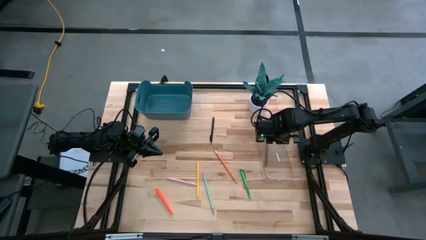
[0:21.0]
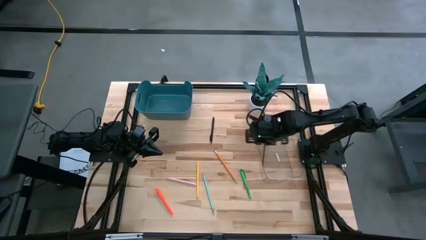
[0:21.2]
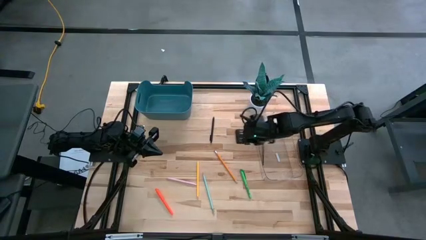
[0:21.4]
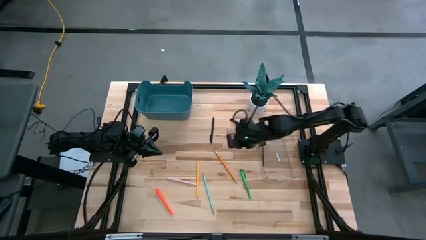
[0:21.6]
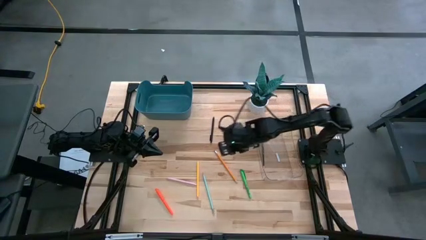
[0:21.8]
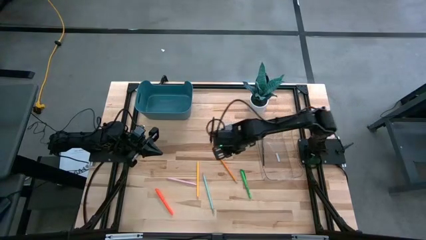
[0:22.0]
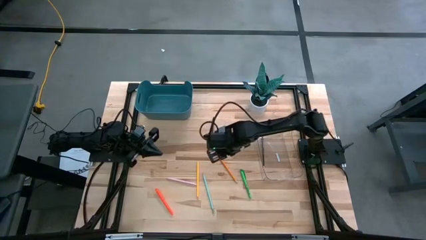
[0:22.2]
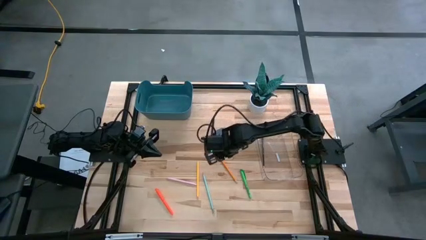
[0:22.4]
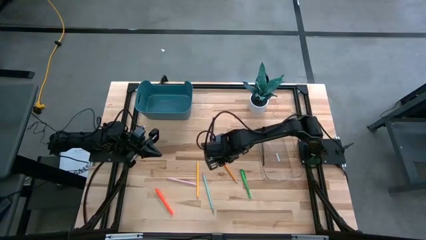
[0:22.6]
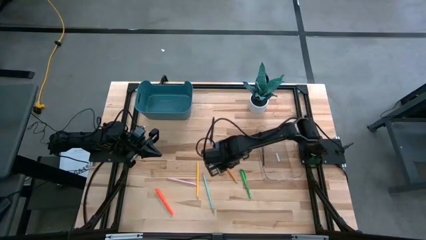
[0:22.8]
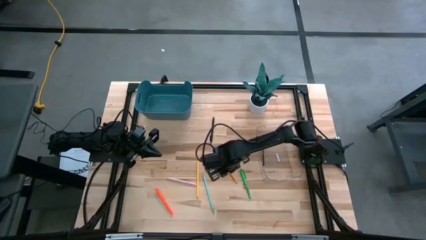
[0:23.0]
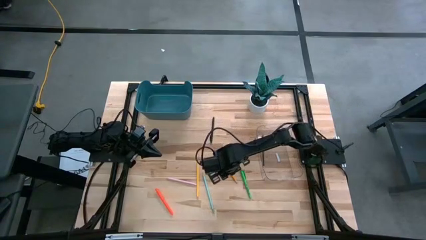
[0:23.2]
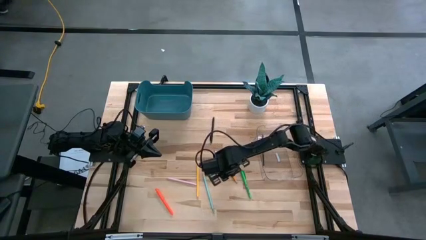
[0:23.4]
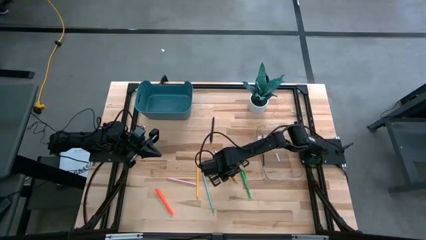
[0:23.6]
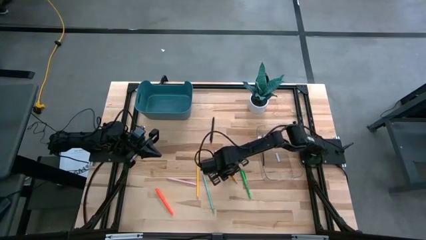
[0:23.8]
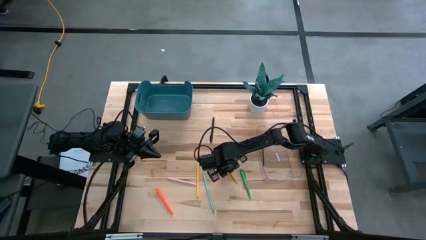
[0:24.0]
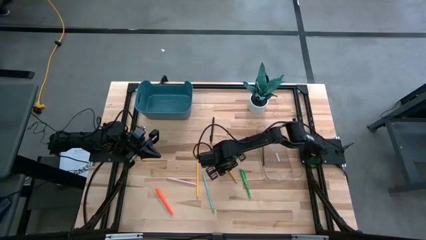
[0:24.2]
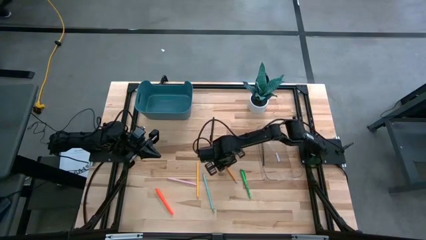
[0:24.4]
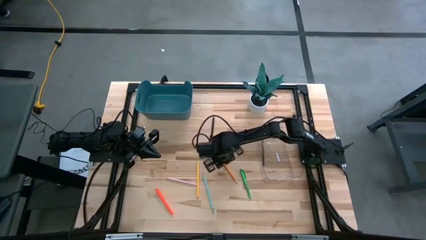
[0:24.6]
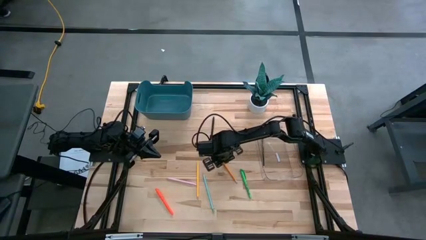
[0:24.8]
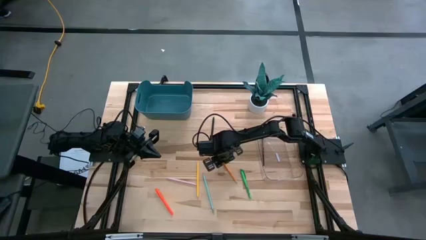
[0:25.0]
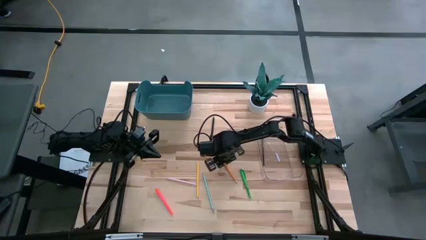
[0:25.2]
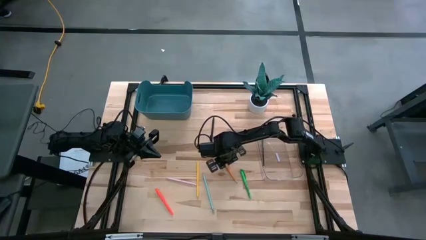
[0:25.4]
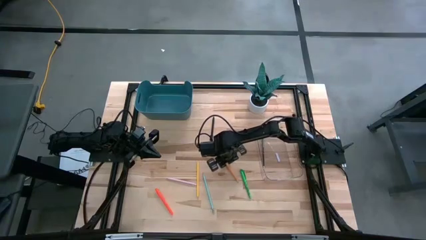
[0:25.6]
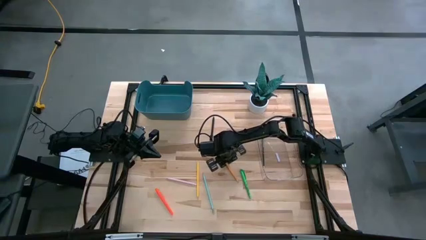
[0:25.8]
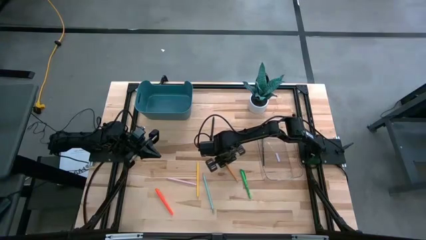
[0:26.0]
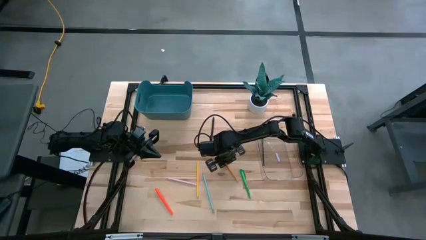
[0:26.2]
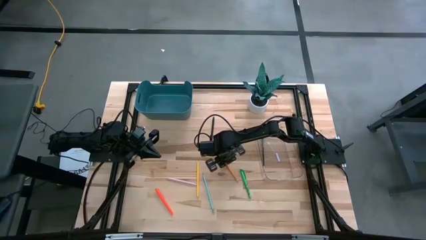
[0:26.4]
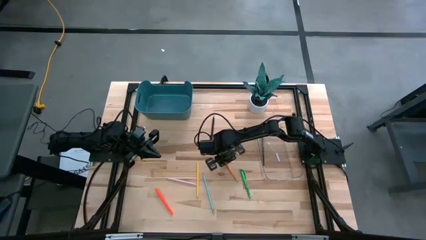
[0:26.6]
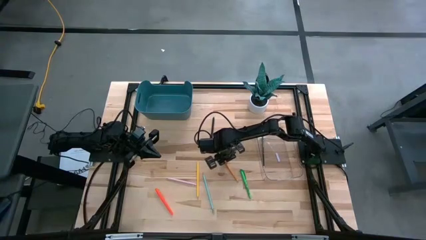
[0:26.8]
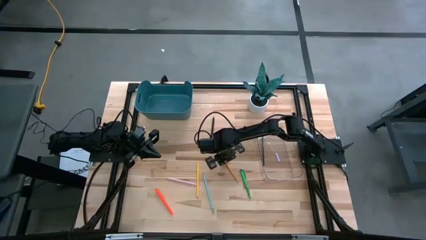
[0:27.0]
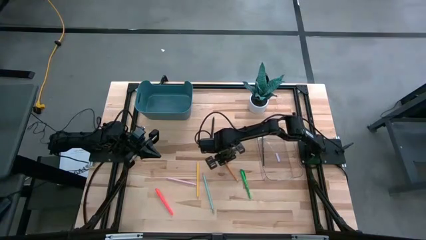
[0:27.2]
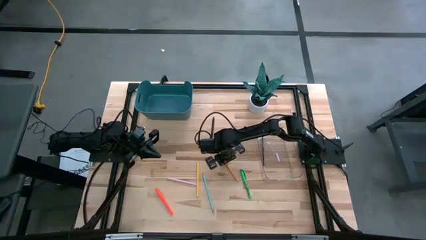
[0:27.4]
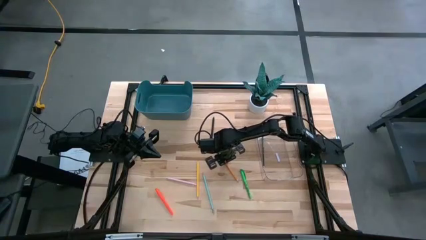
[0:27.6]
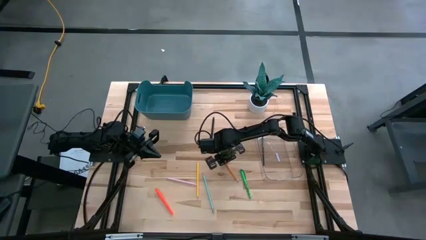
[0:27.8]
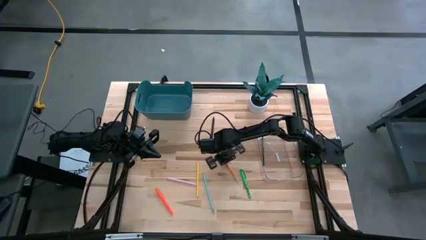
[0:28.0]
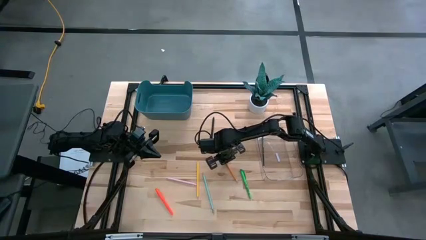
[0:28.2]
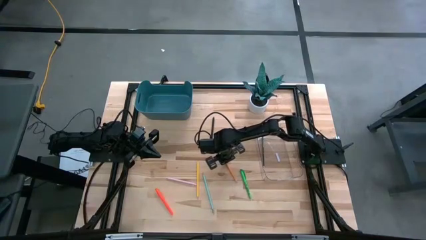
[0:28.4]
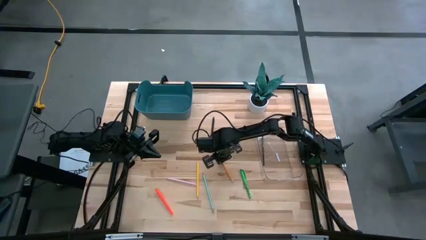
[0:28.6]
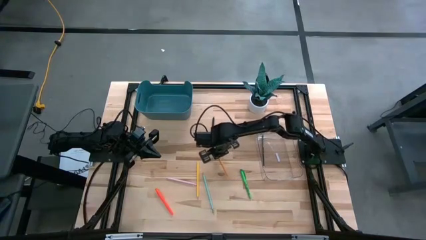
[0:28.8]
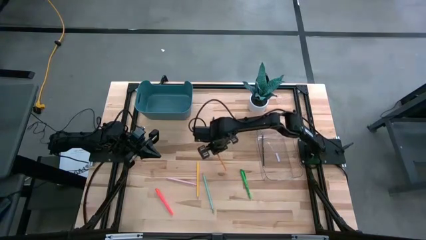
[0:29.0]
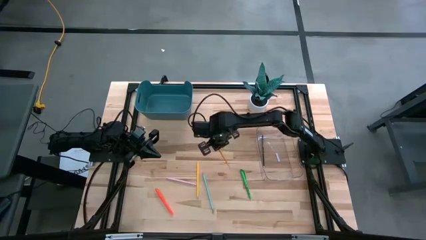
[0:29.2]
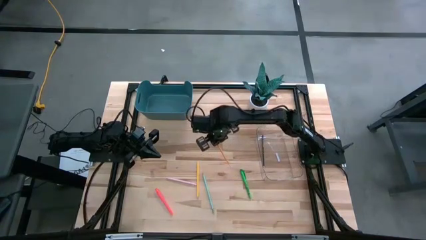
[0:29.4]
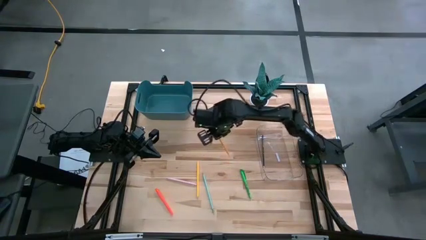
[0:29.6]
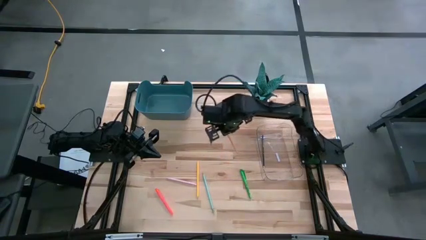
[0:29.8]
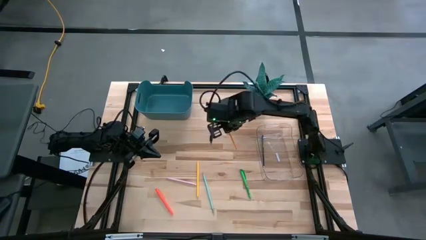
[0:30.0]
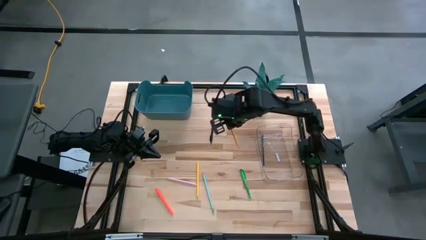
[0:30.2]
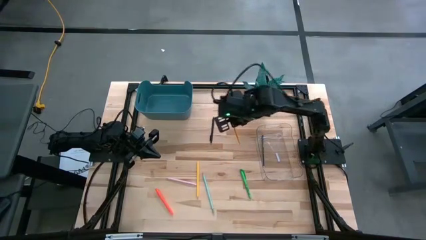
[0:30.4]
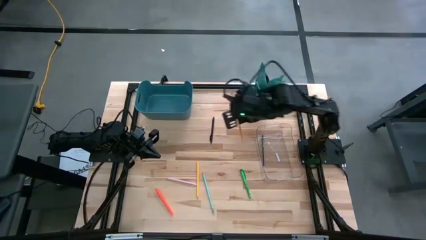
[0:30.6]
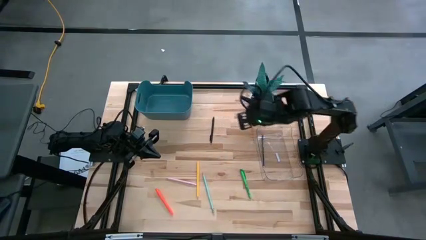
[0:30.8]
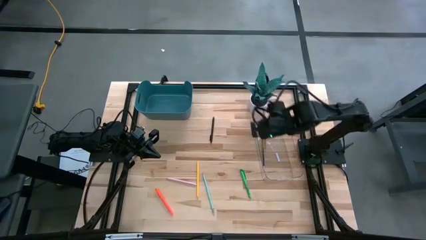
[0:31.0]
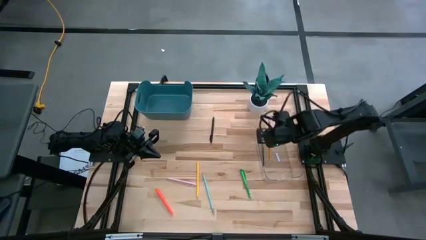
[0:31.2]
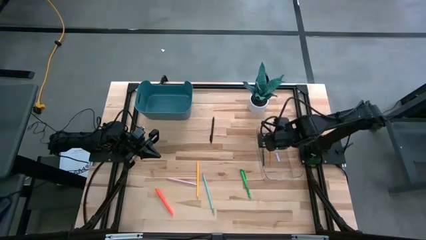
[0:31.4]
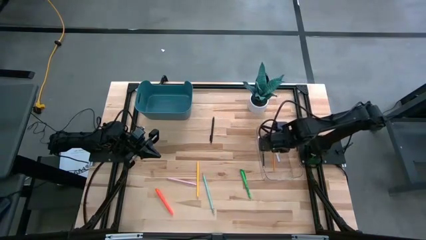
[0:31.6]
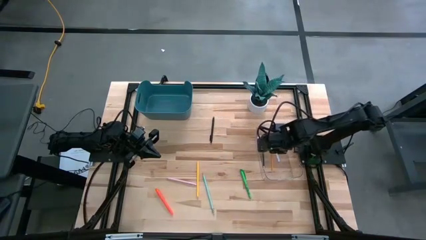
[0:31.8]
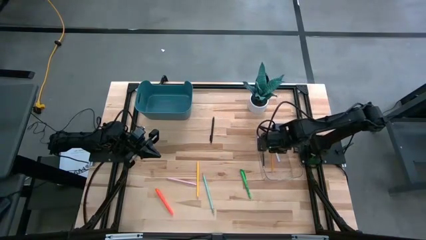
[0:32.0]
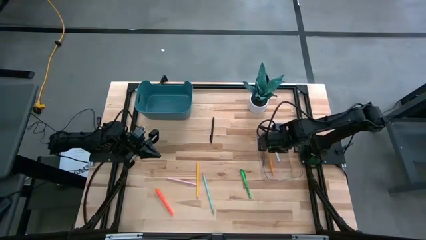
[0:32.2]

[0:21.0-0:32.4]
Task: Sort pens & pencils
Put the orange pencil into the transparent bin

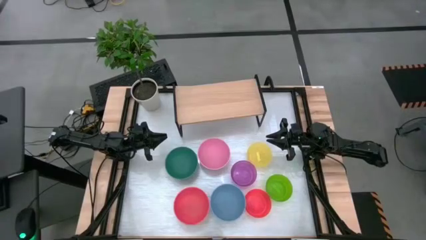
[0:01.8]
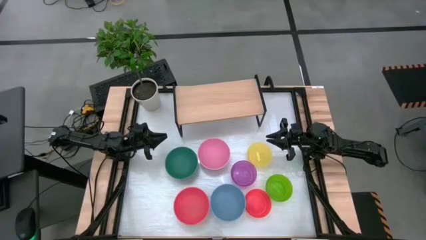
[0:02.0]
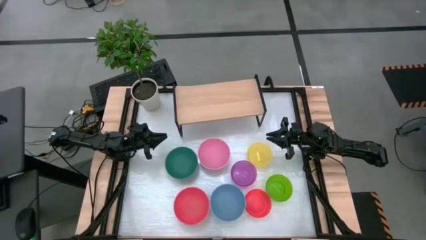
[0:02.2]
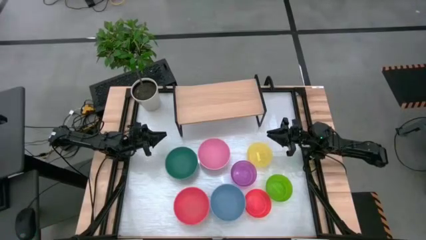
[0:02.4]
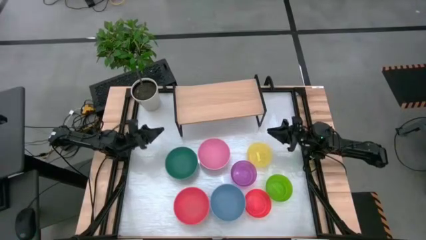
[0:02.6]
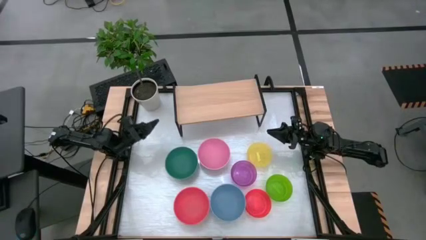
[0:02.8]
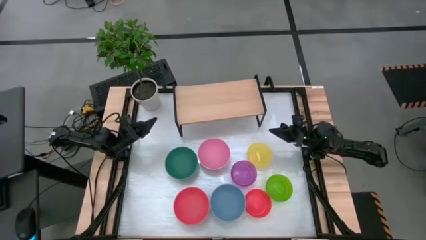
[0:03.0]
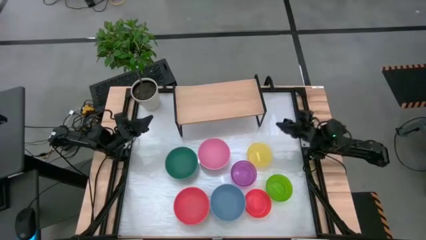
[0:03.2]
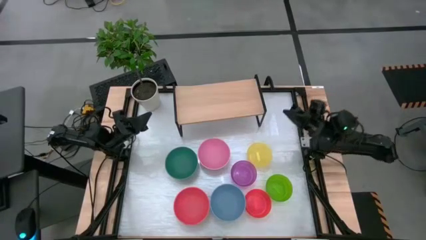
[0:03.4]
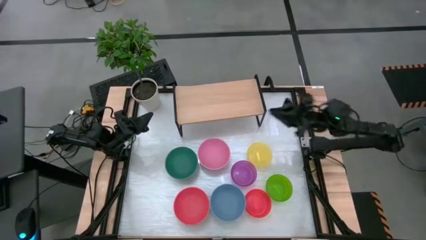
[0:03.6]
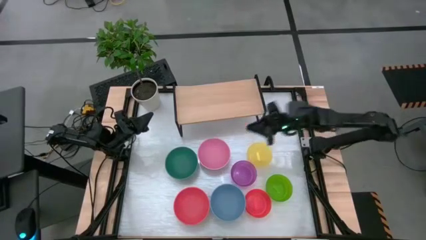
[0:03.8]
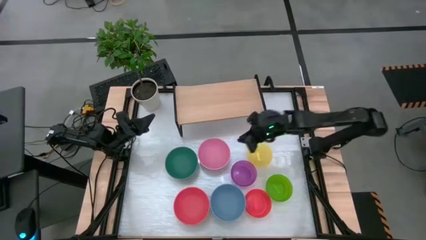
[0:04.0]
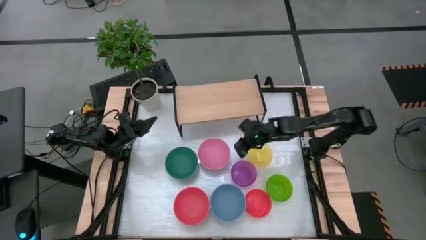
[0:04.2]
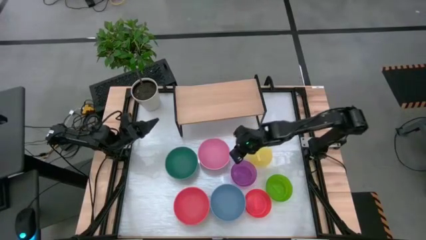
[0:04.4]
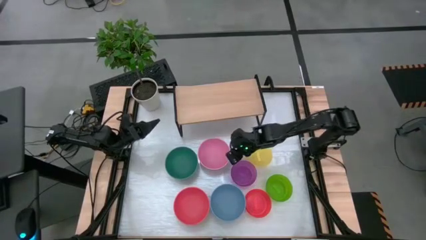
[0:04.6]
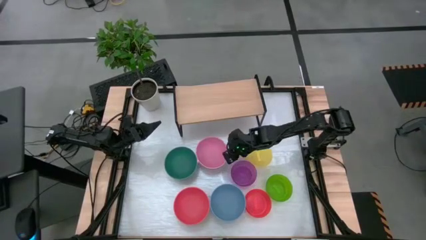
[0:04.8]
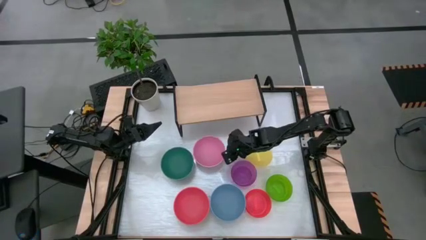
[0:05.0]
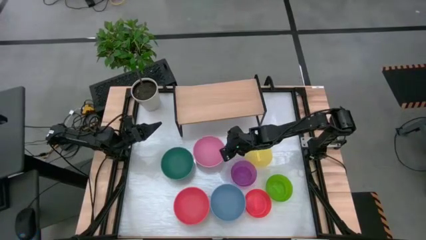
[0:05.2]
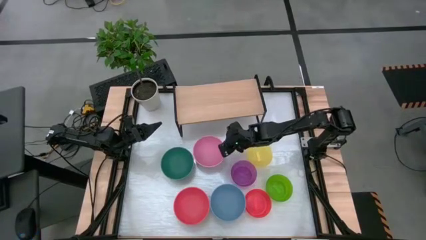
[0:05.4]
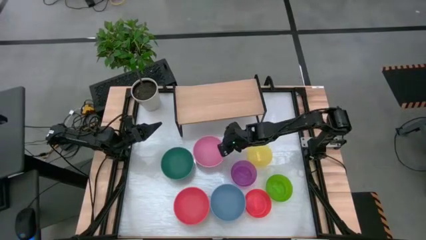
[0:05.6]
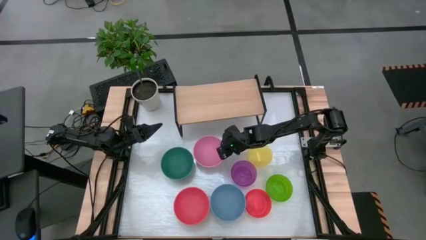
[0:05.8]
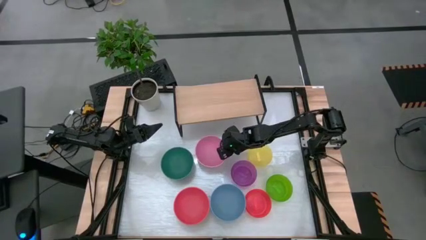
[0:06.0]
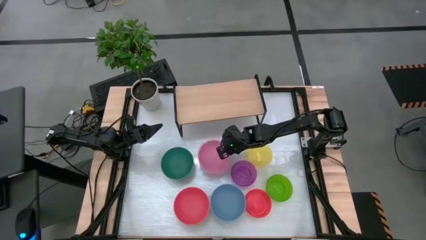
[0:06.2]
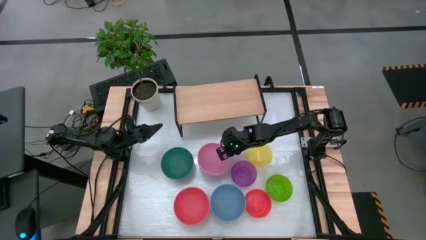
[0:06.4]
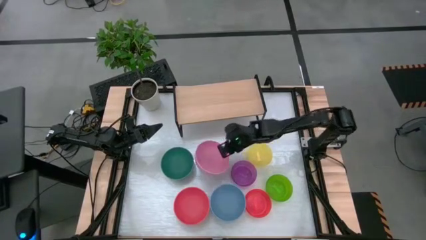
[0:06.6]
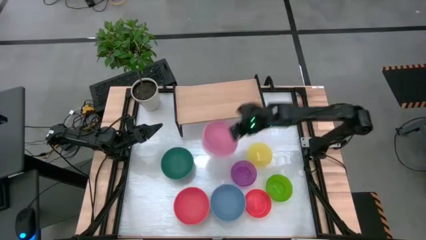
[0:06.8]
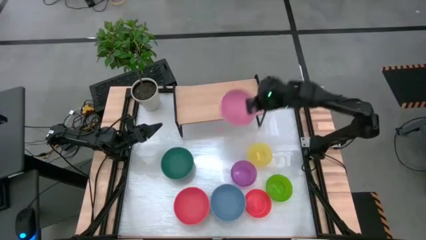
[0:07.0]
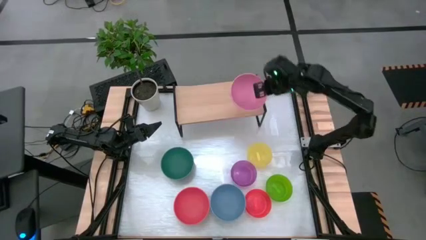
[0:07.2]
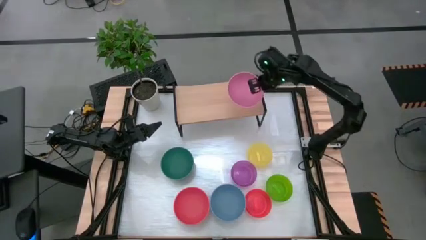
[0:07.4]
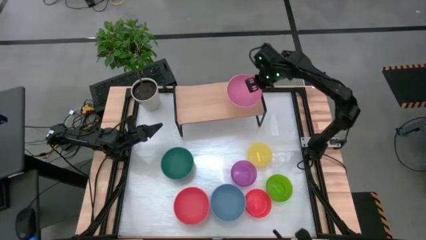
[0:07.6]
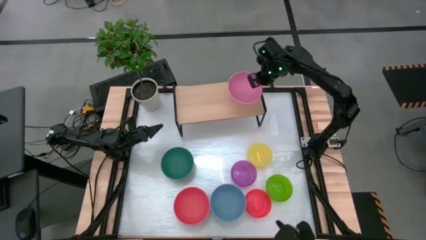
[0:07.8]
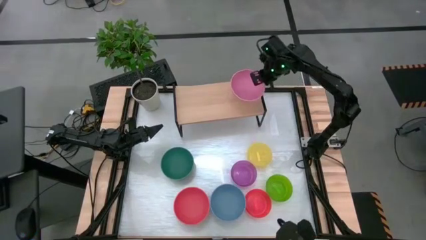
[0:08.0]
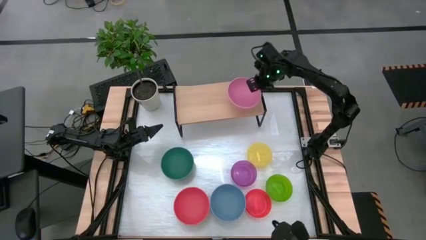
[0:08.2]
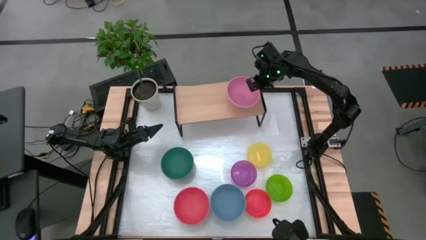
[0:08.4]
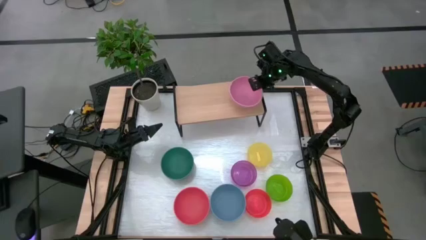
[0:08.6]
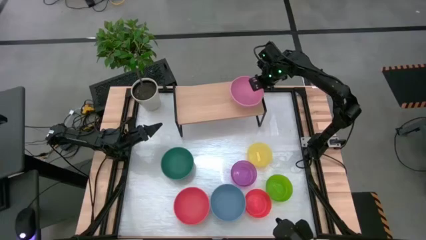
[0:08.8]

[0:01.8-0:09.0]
Task: Place and stack bowls onto a shelf
Put the pink bowl on the shelf
